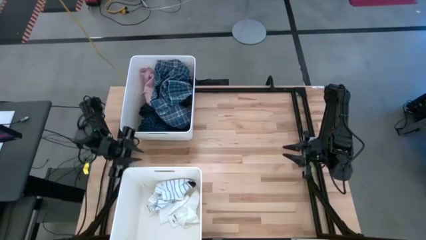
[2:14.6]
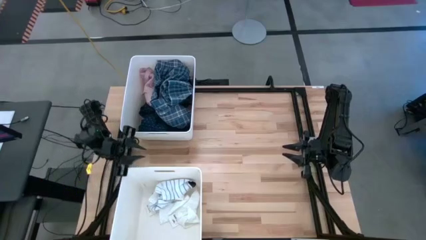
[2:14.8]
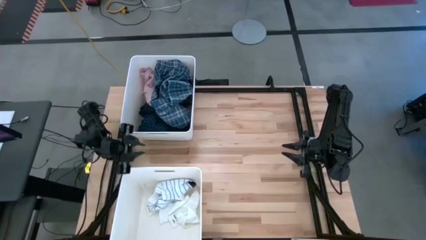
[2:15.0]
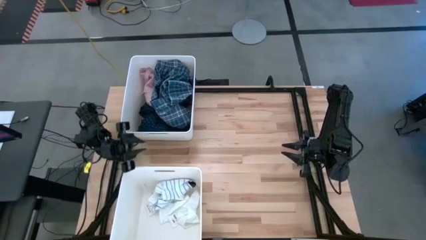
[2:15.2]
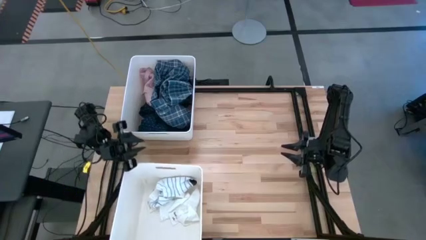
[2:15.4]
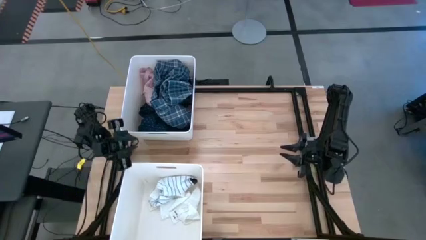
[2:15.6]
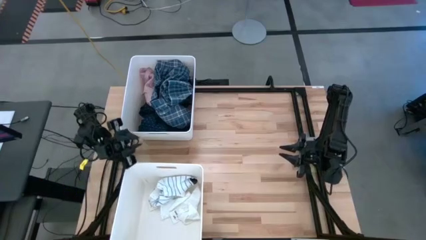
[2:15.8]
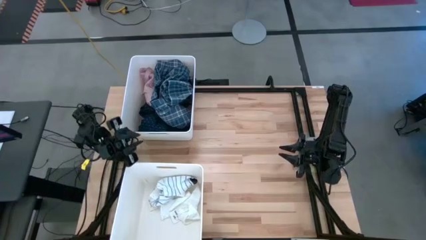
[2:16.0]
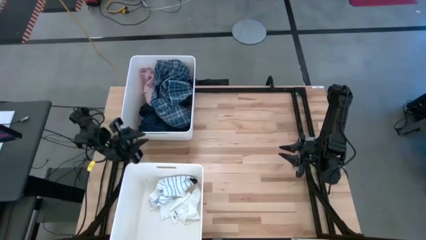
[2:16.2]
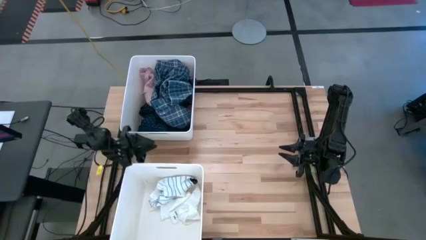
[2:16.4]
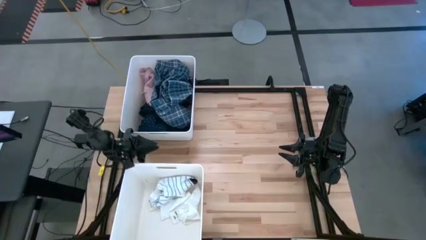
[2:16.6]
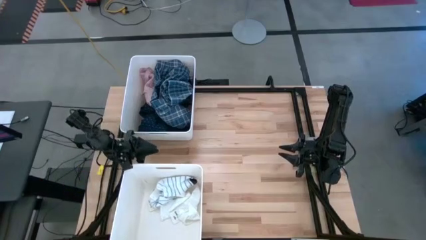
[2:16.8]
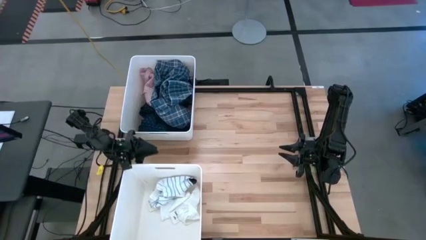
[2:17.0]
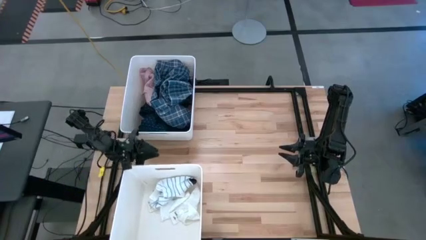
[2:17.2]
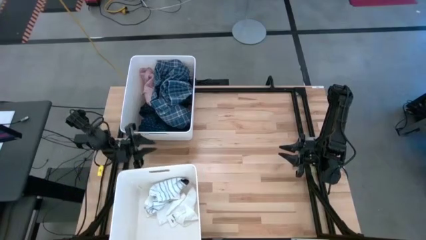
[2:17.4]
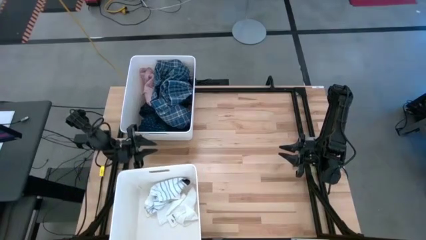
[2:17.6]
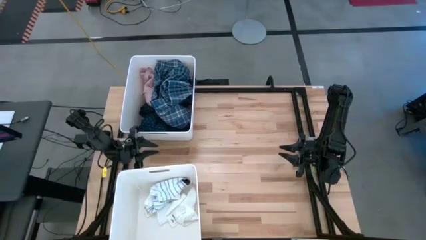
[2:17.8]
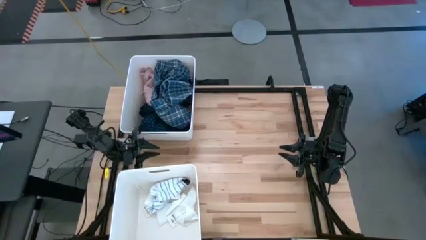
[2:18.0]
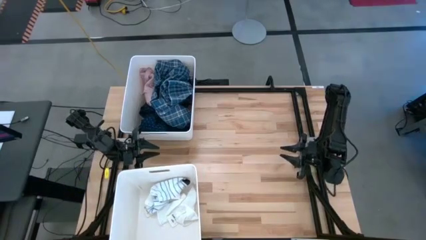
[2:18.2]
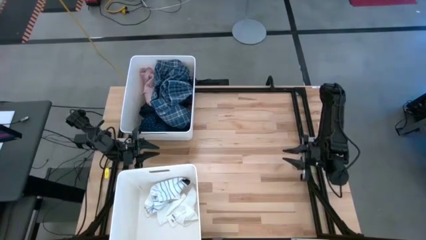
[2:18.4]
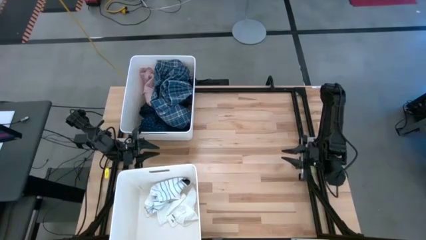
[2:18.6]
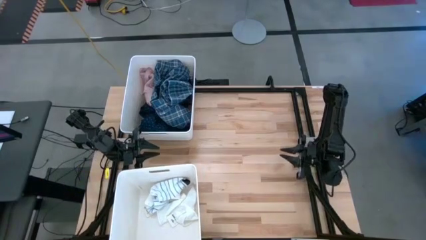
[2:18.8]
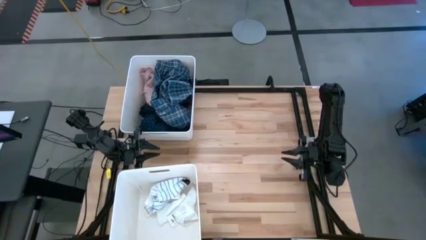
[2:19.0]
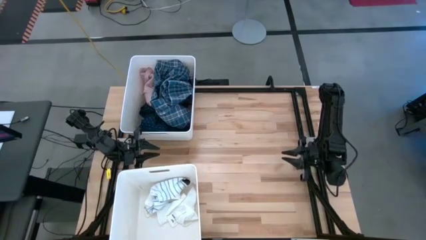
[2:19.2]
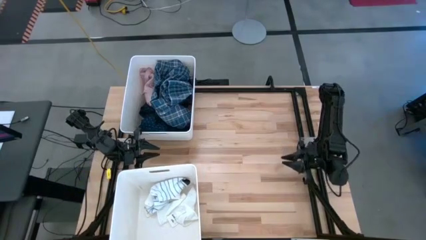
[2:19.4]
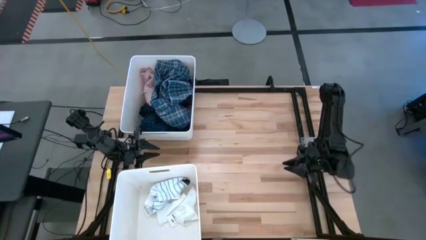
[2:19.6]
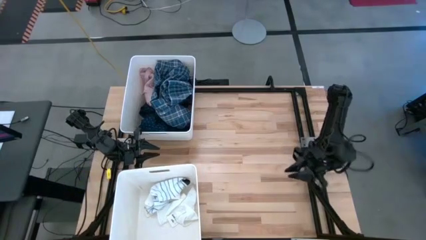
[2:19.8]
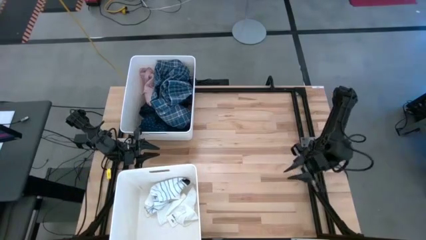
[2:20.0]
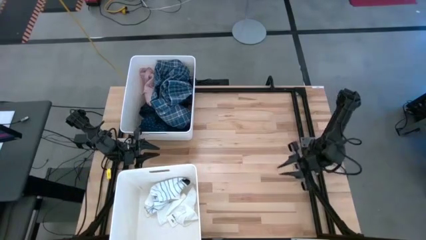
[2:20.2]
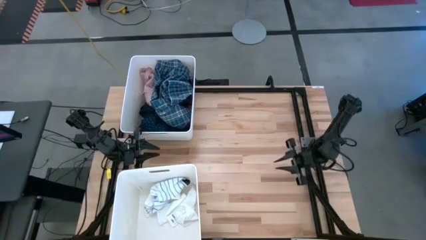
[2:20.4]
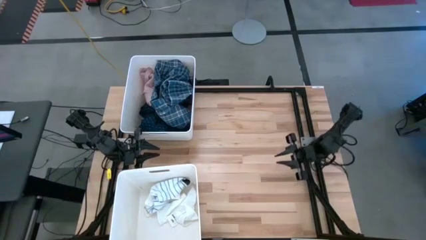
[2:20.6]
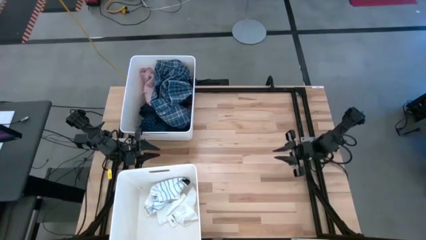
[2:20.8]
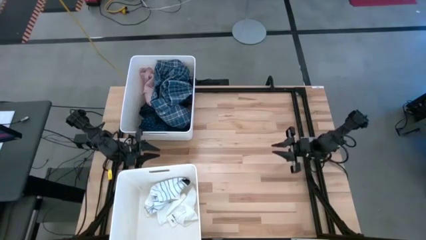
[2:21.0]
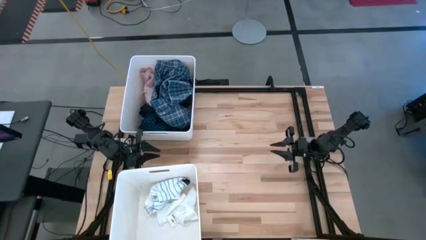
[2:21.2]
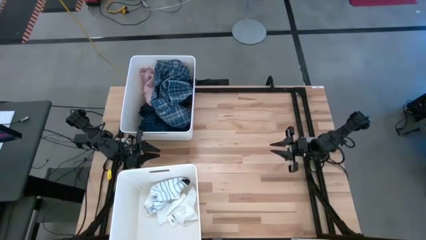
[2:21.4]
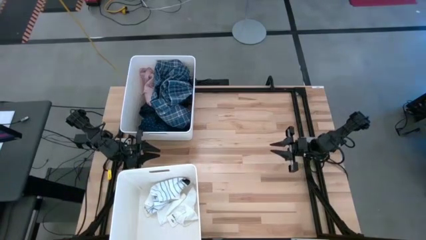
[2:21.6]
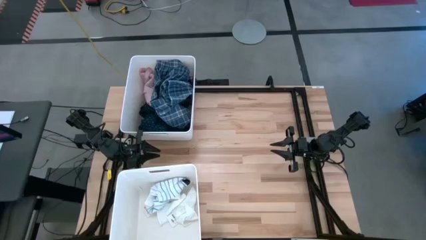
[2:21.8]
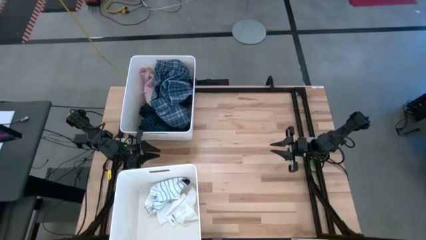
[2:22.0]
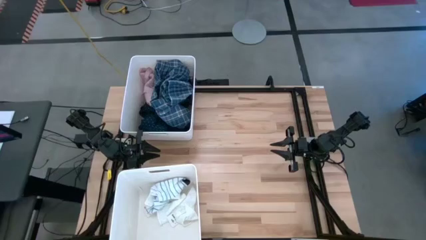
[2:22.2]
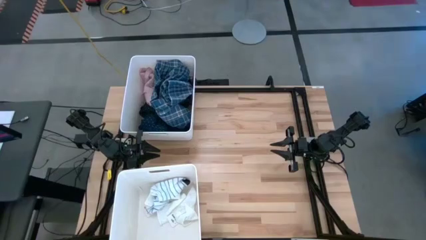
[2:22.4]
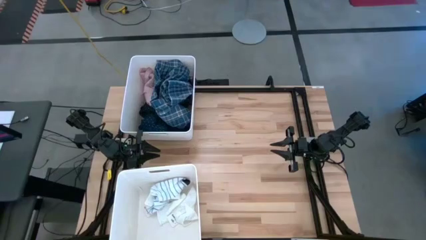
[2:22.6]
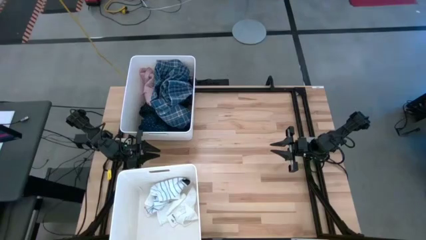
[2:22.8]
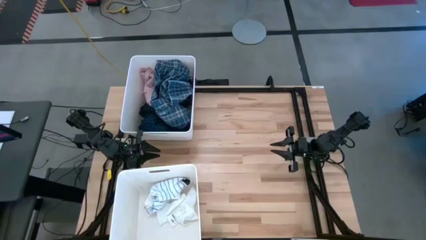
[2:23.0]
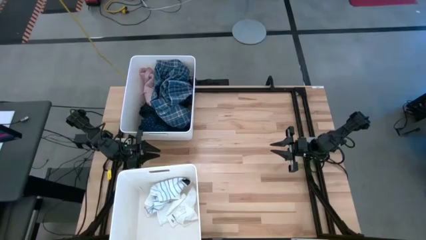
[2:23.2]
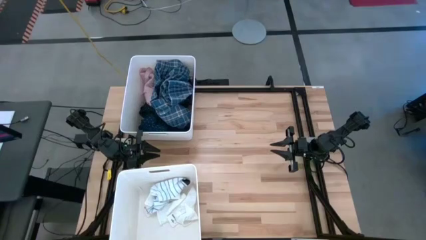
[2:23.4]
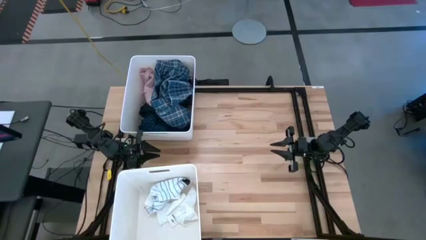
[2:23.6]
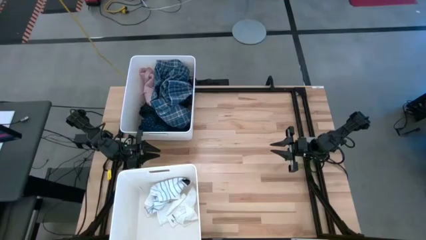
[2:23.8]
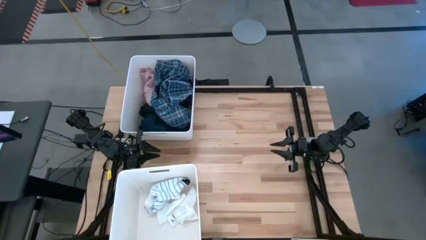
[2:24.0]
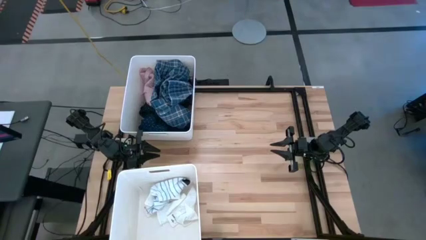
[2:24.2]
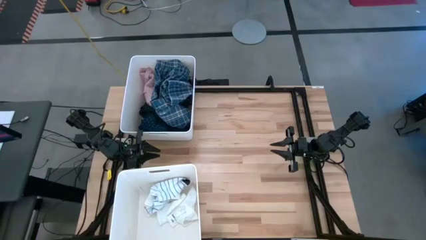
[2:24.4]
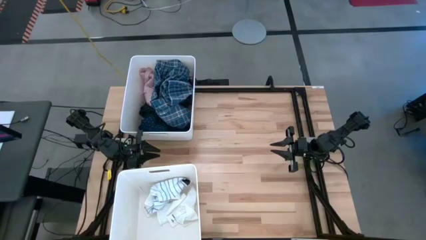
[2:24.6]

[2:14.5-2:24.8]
Task: Sort clothes
Return to Home Position

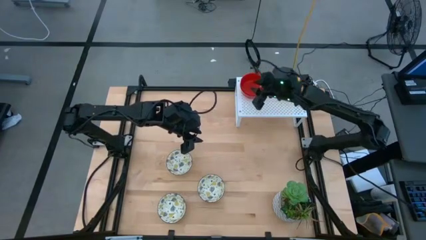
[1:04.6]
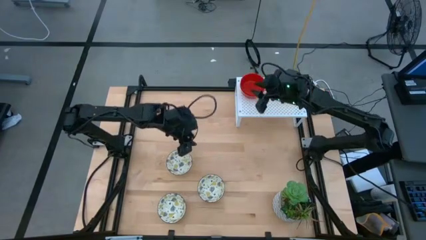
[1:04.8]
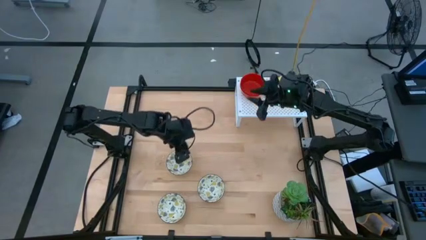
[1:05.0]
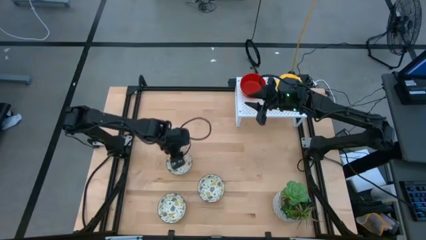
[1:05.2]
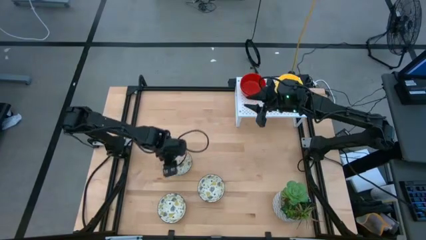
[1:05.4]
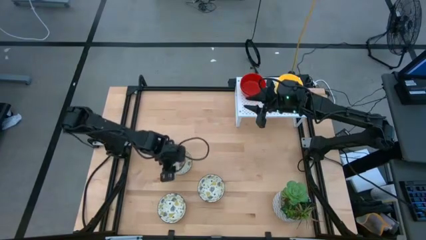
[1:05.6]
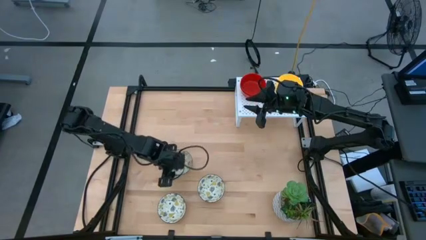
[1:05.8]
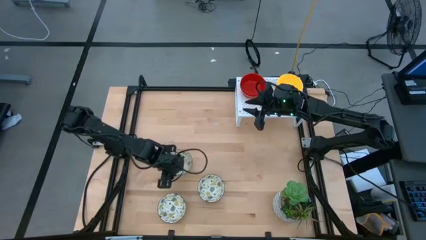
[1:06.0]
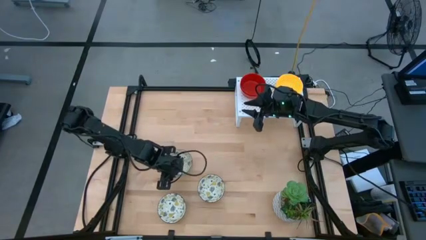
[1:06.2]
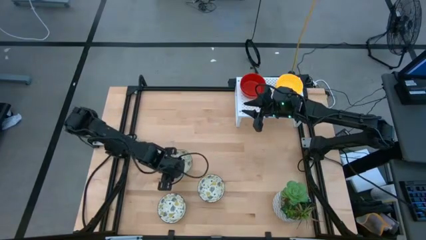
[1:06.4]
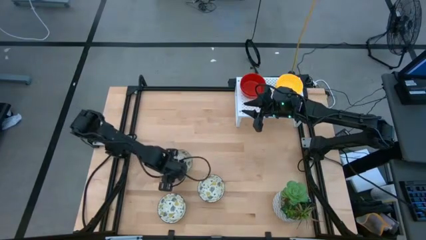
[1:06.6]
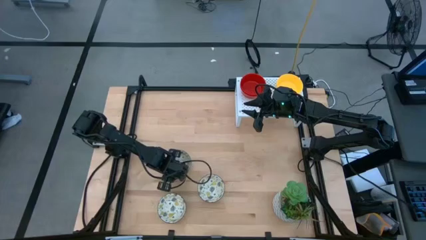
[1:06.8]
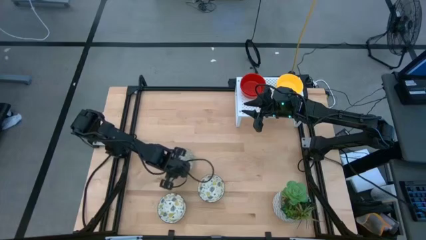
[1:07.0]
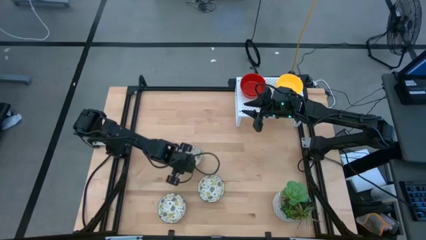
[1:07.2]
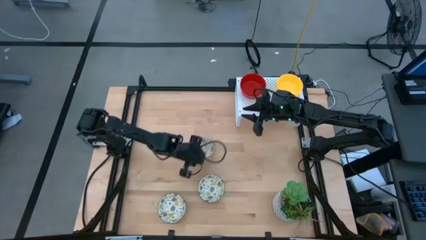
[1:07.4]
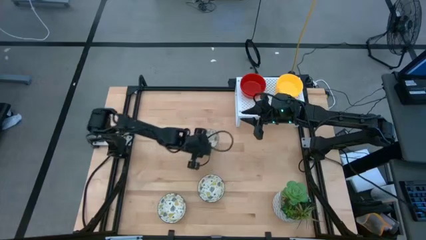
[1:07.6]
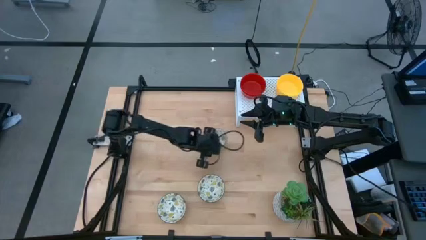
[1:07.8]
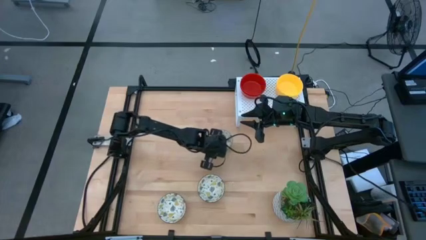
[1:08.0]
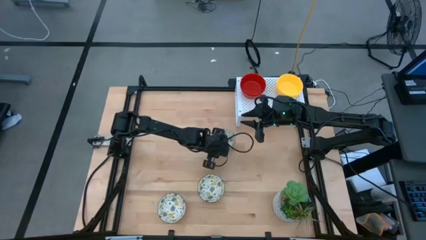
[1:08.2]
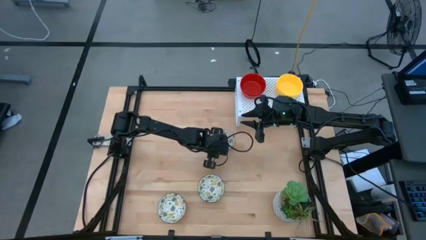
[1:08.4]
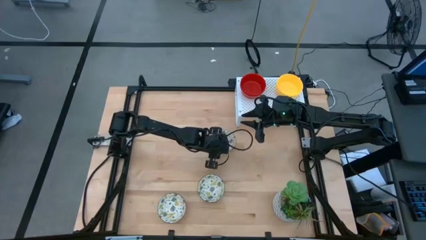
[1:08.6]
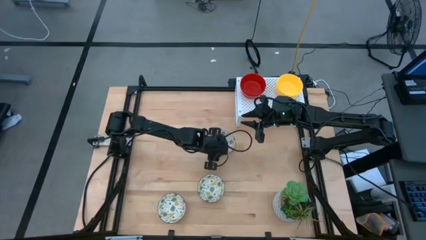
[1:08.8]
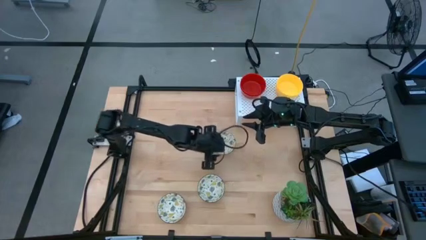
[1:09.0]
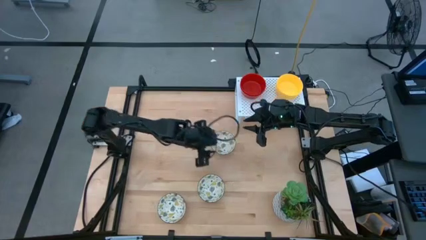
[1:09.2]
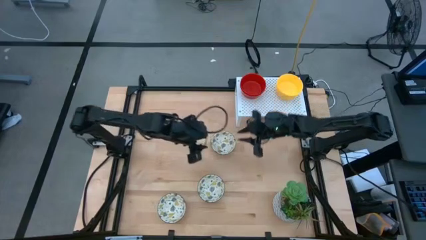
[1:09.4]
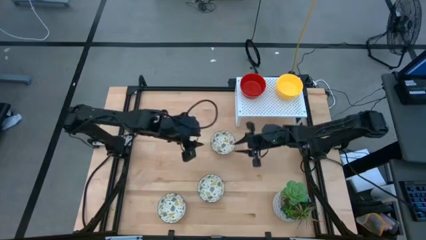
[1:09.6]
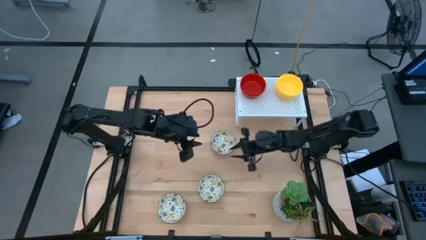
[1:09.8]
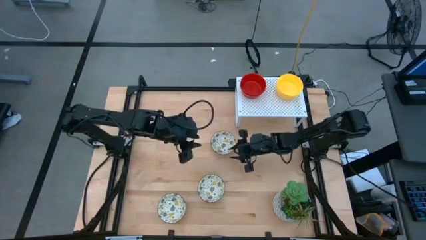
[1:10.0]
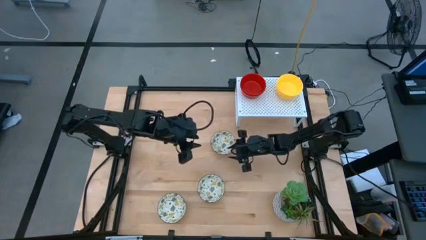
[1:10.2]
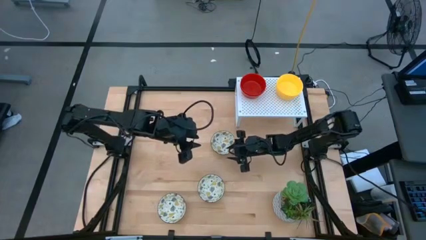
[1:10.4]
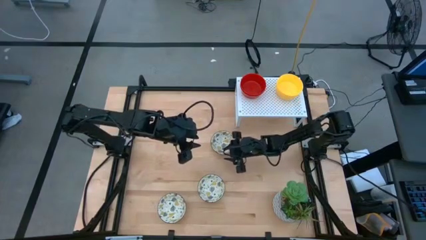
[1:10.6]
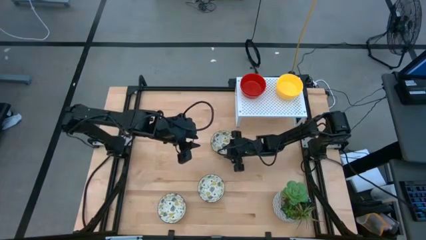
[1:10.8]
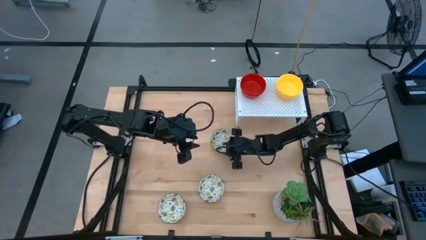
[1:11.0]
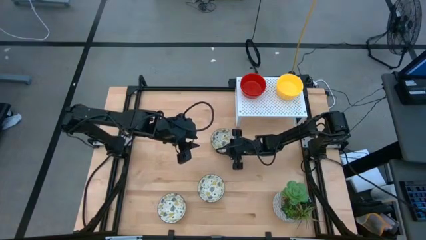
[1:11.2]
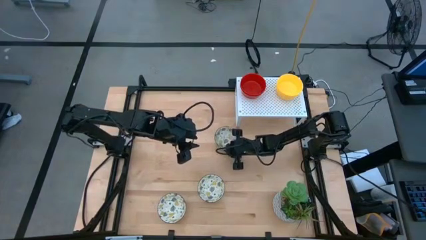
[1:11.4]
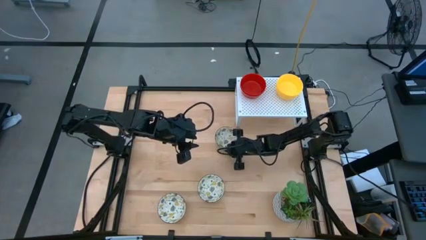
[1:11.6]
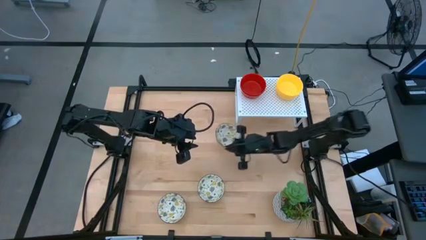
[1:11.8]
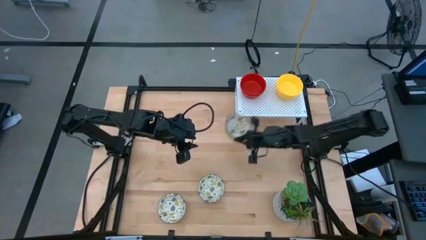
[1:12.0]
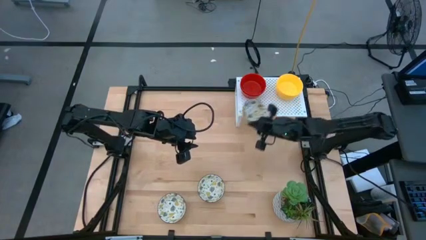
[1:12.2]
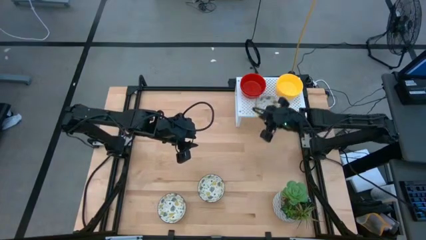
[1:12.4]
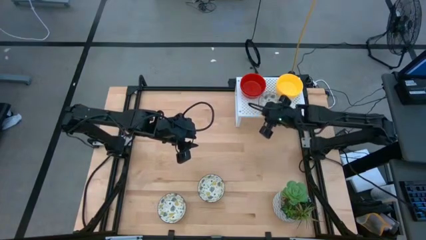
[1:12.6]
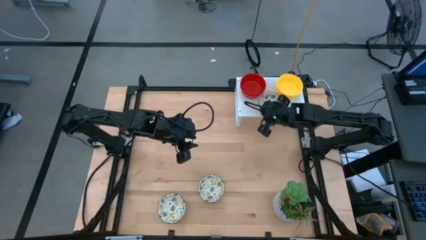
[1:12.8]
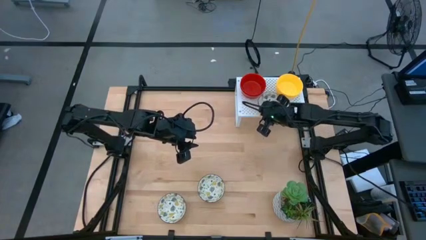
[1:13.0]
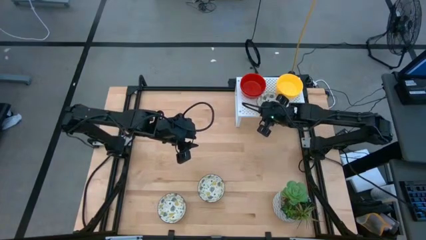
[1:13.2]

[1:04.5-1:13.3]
Task: Pick & Place Mini bowls
Put the white patterned bowl on the shelf
